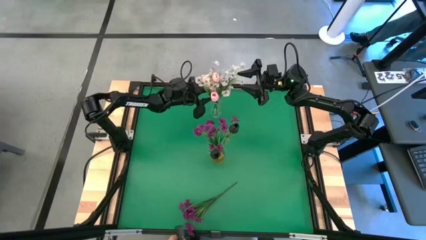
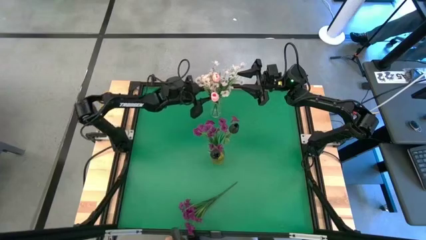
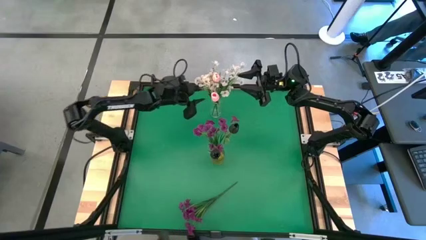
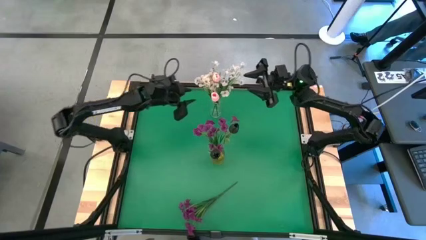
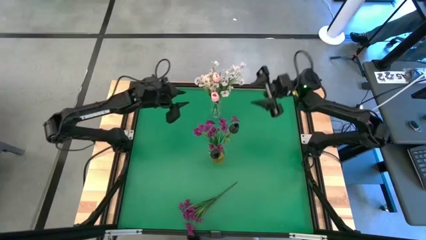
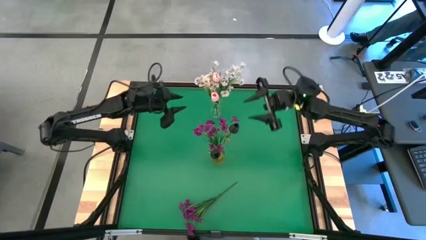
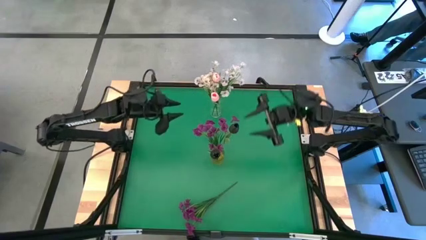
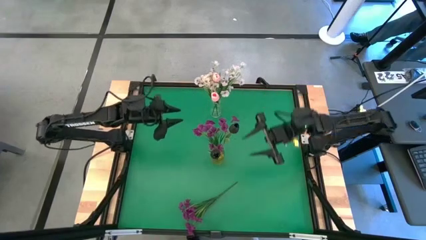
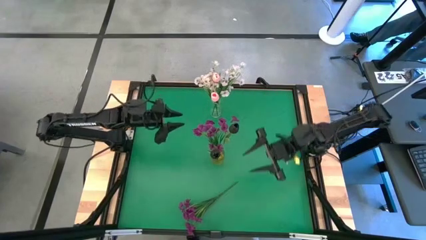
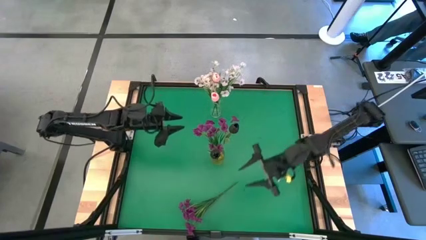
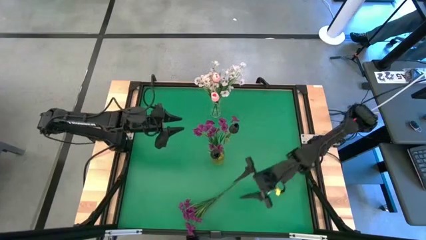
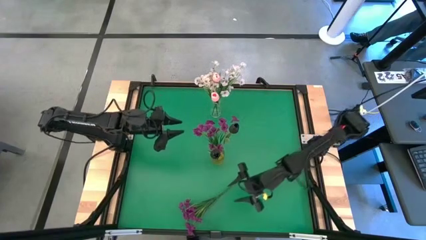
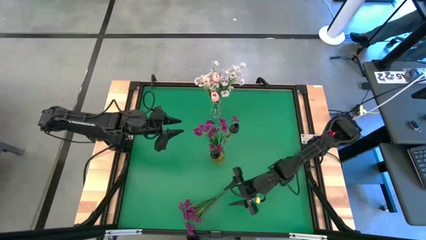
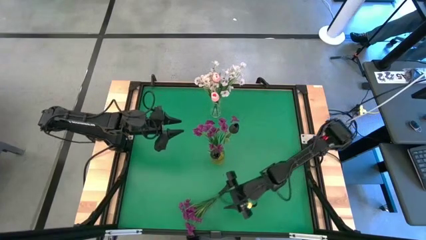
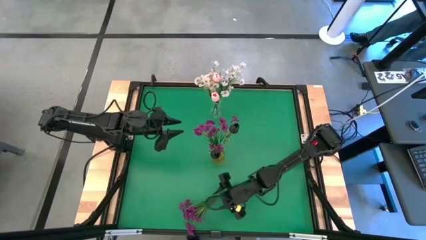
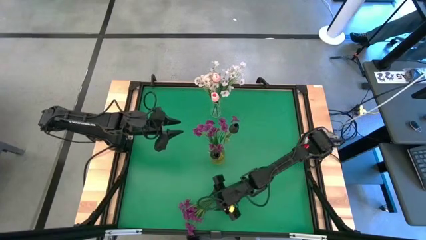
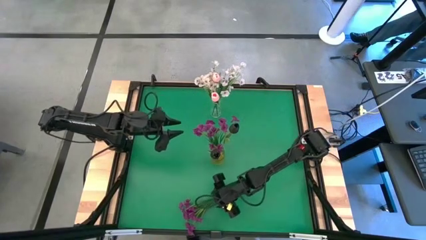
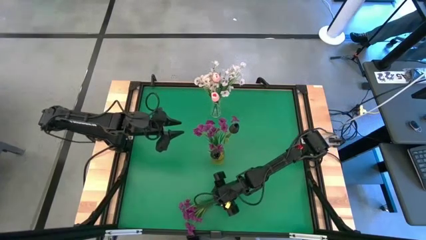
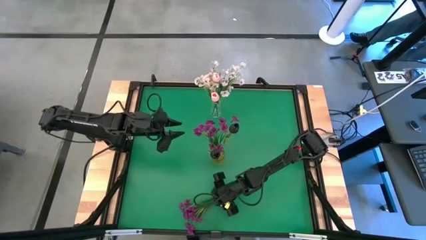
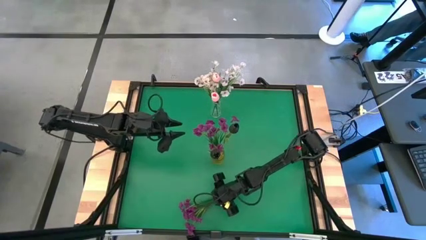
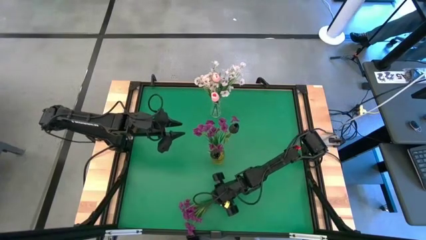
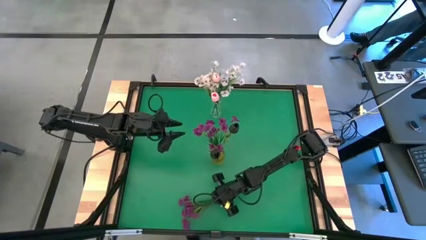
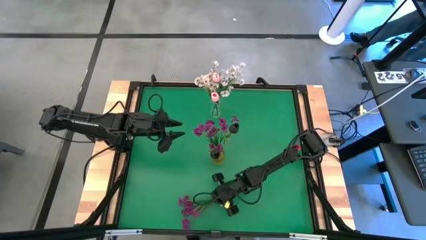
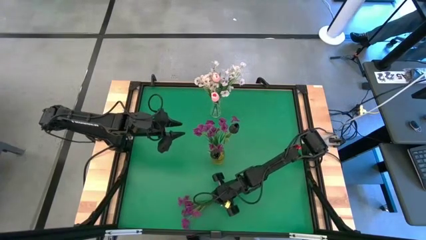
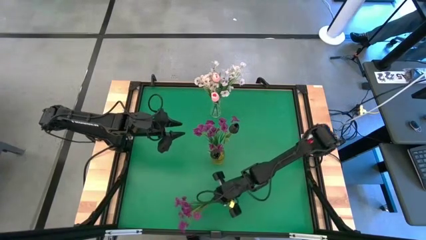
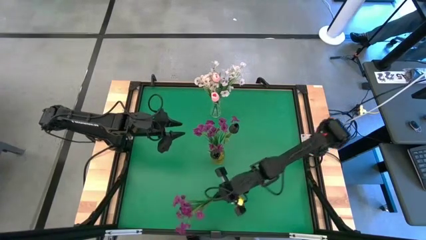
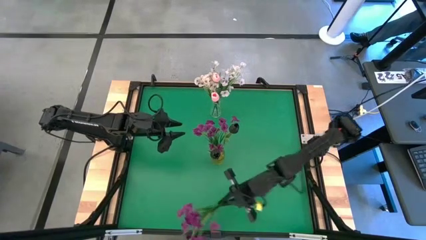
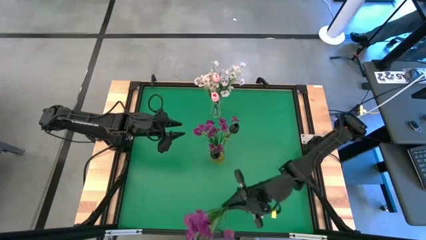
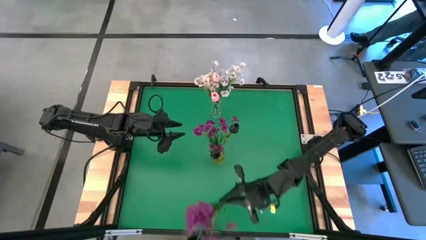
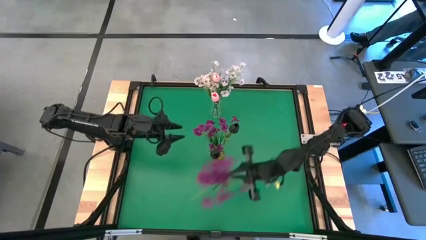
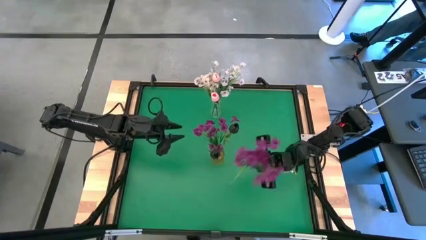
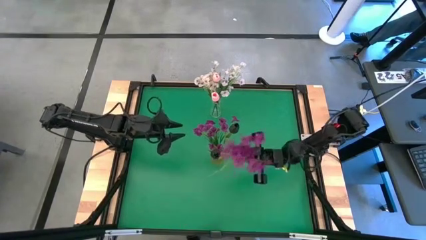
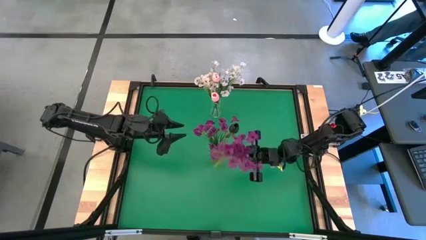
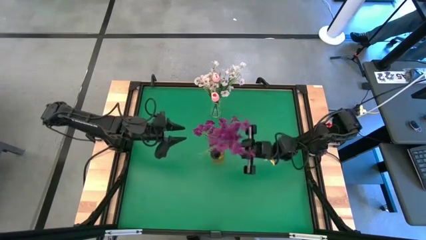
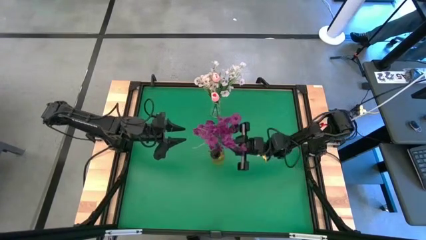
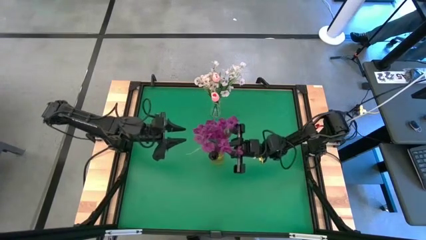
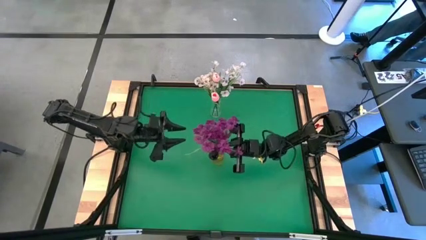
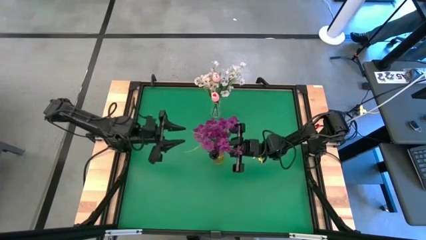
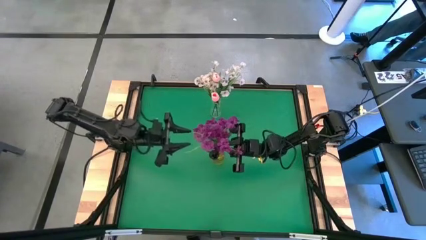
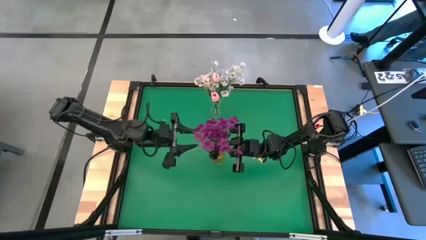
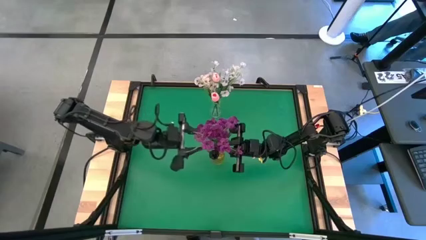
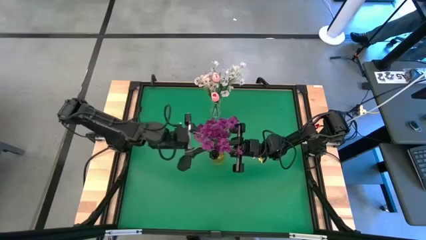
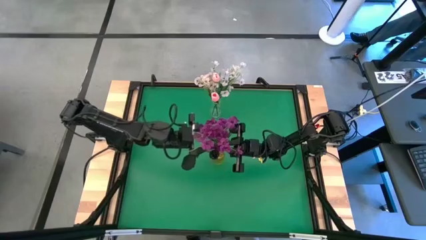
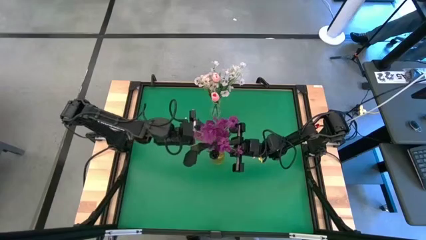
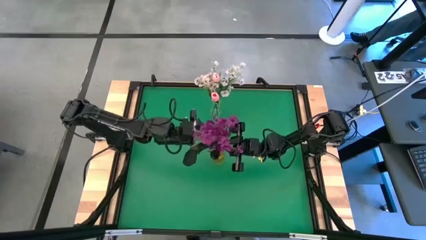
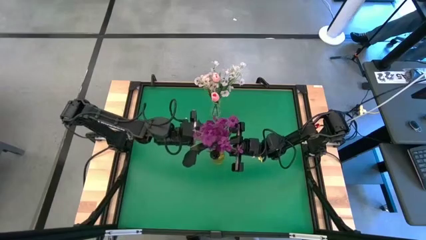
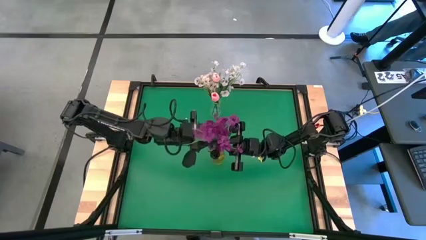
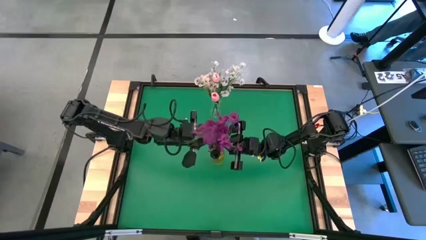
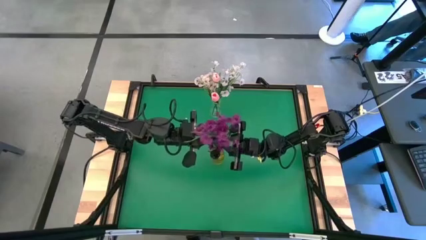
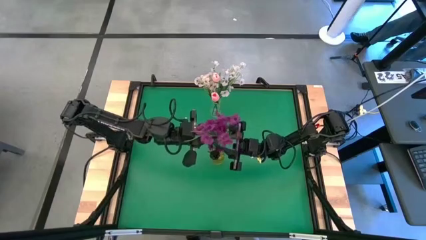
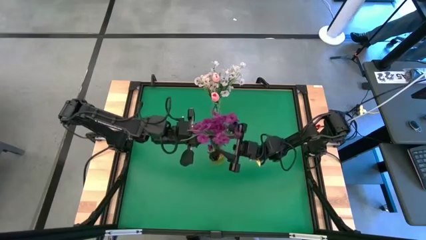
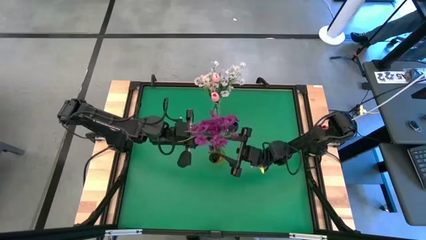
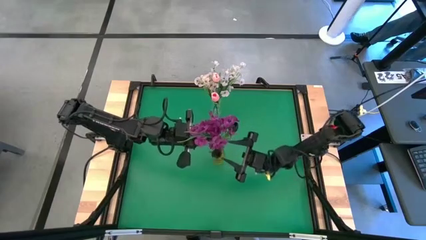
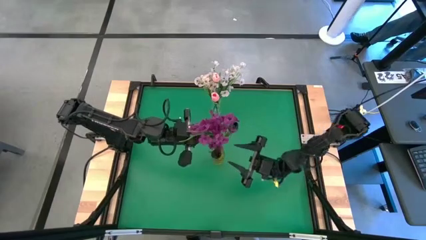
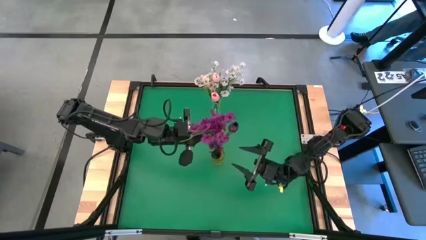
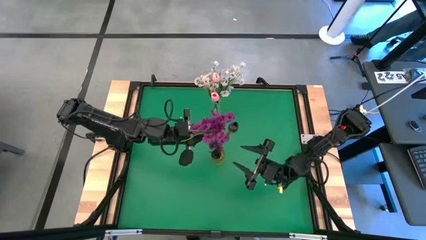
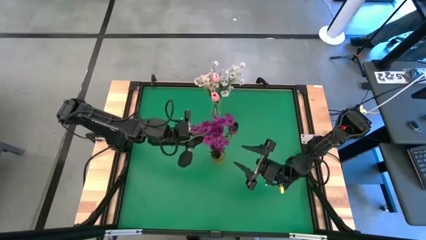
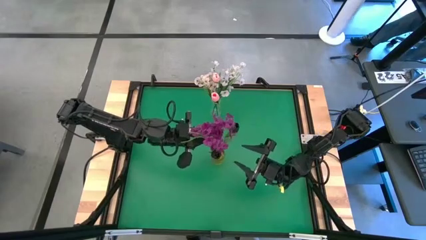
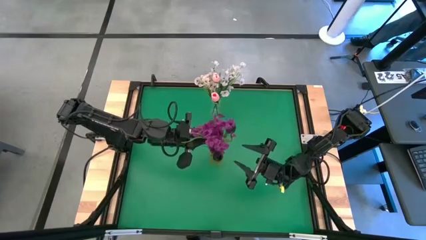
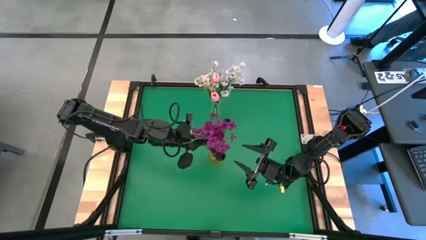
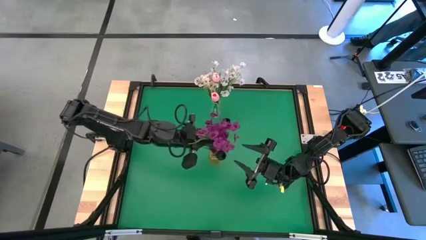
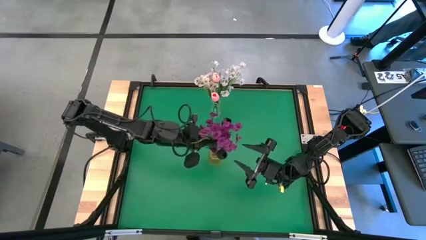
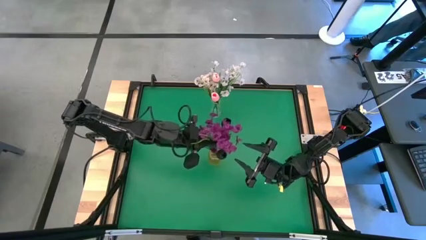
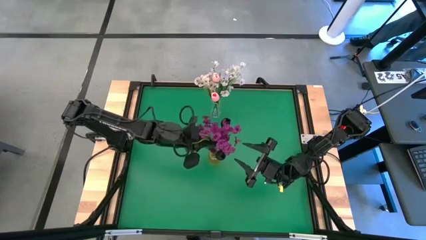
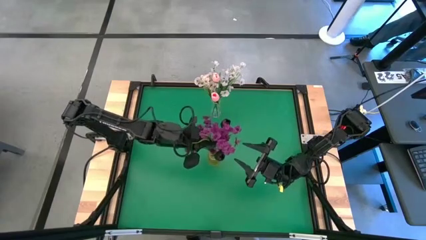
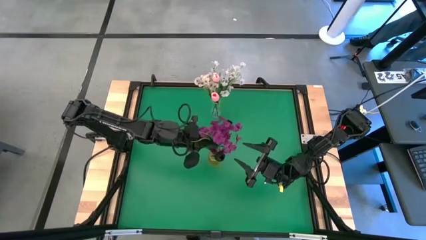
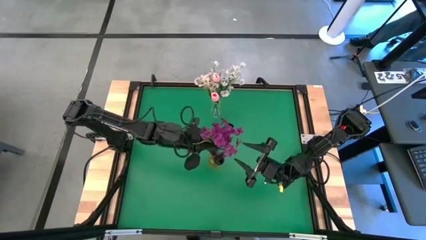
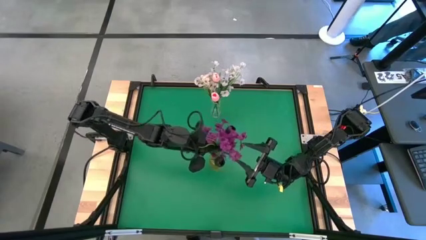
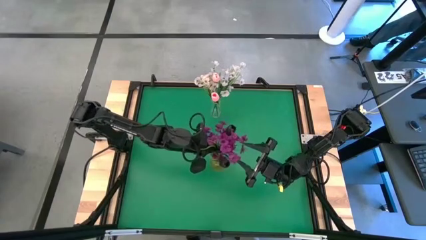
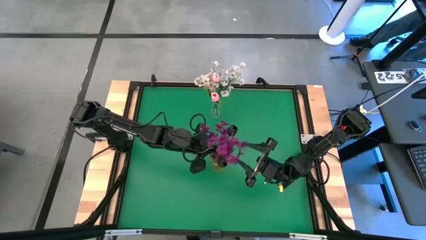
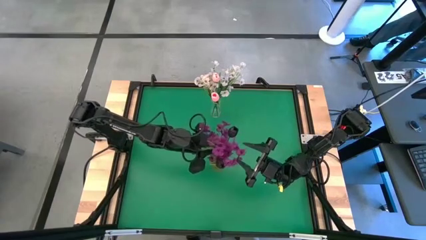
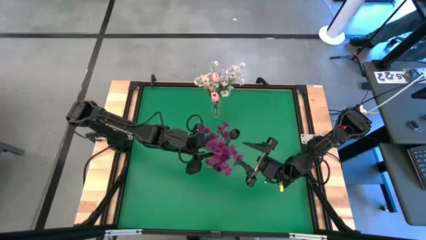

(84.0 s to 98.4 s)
Task: Sort flowers into vase by color
Put the violet flower into the yellow transparent vase

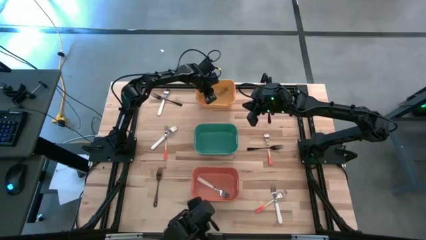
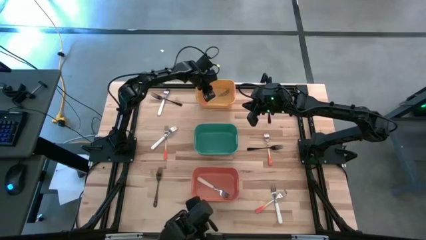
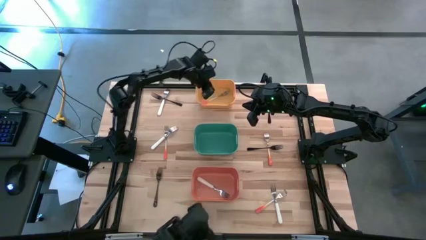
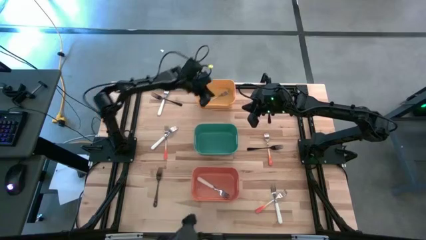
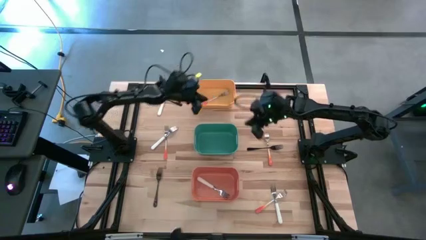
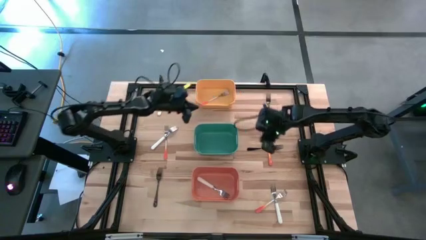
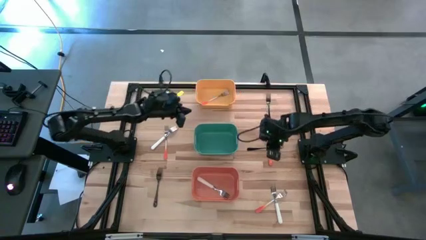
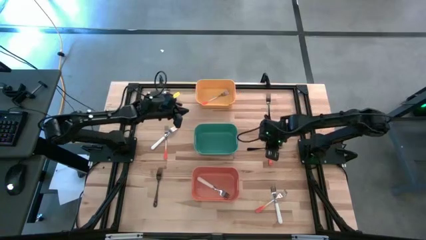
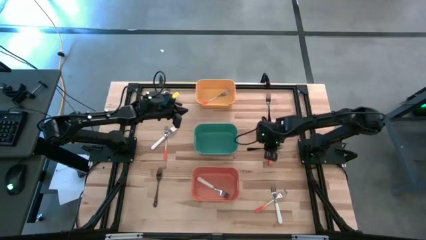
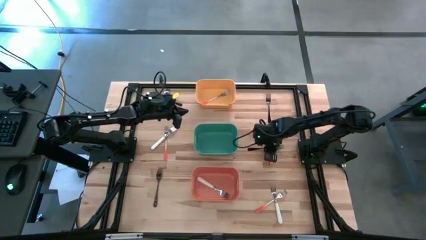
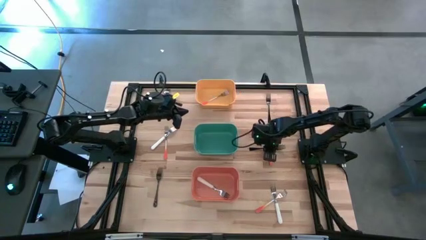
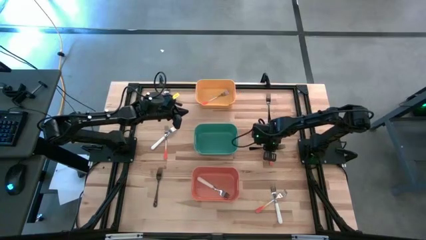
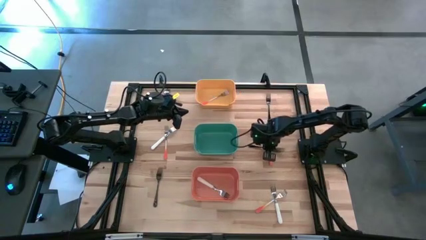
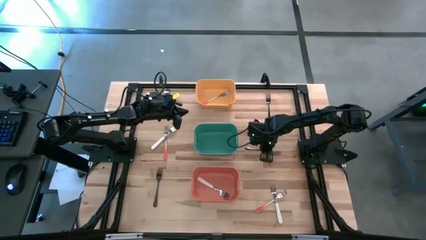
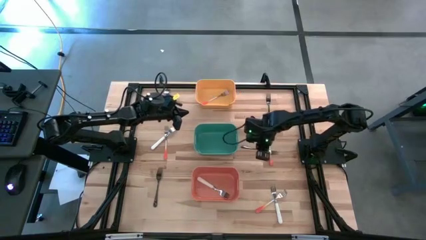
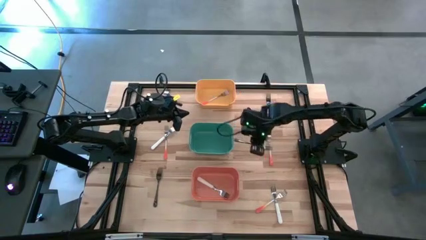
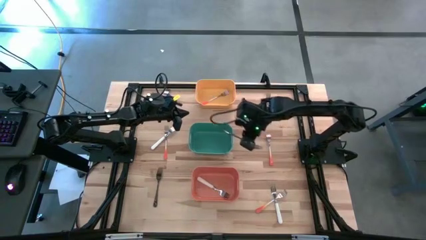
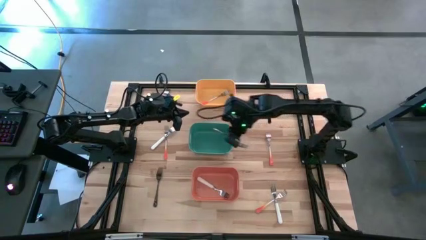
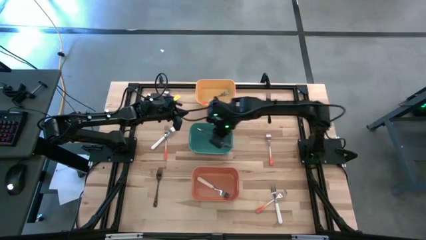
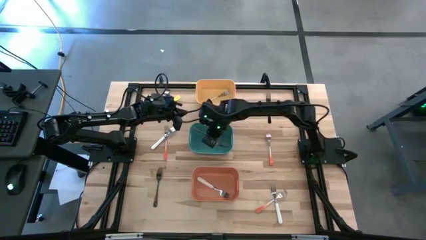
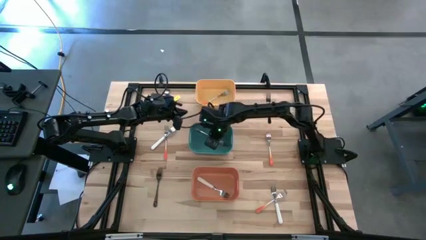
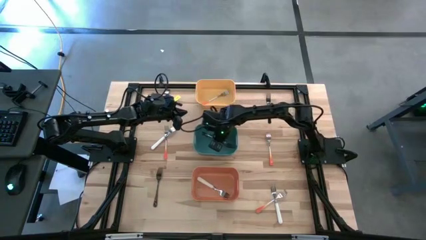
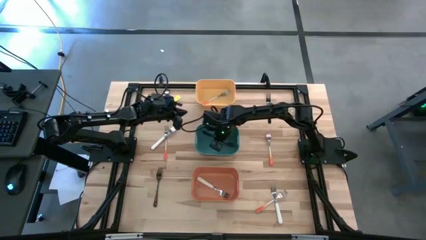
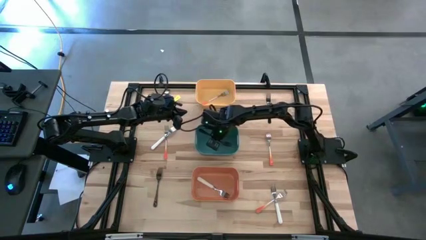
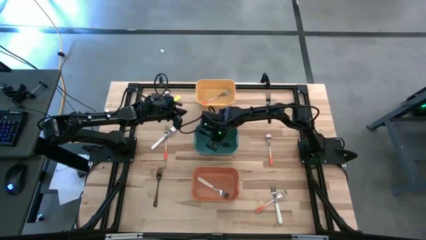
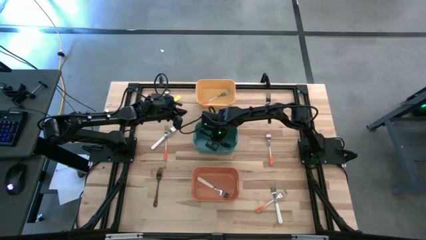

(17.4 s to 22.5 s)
Task: Sort silverware by color (type)
Put the black fork into the green bin
